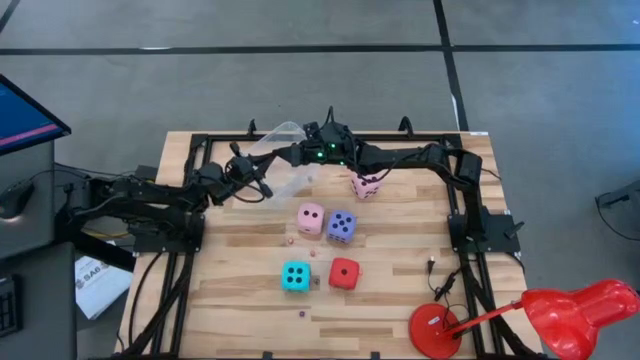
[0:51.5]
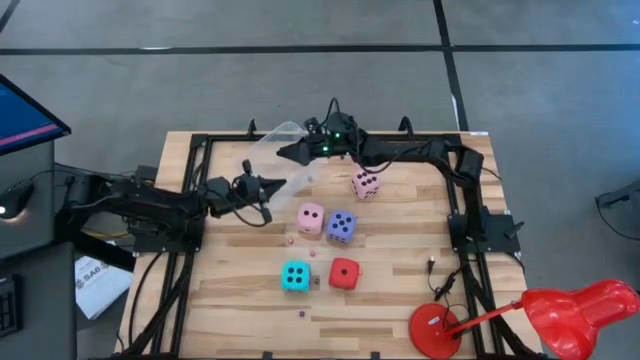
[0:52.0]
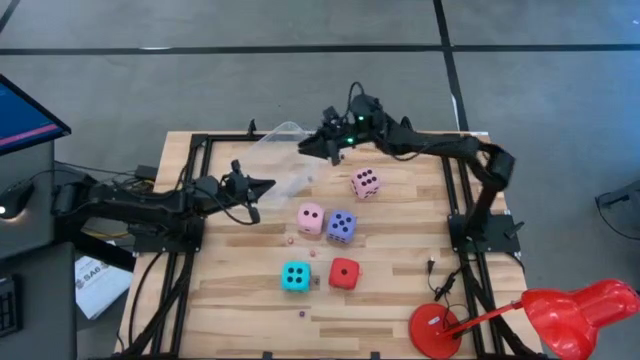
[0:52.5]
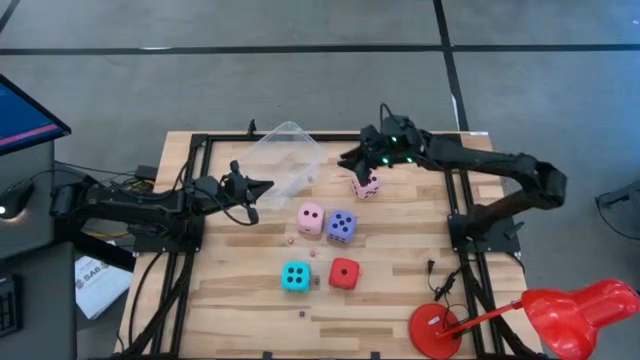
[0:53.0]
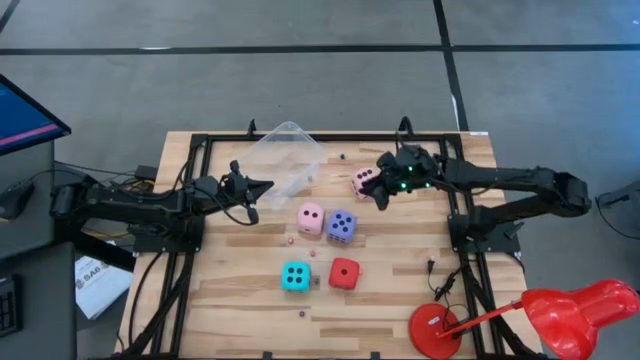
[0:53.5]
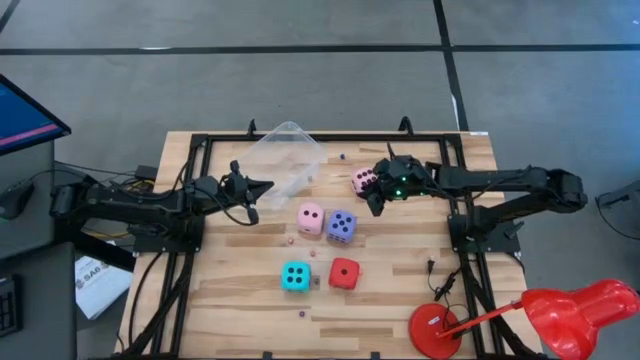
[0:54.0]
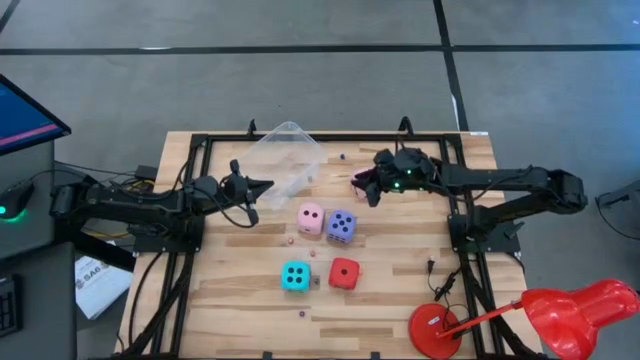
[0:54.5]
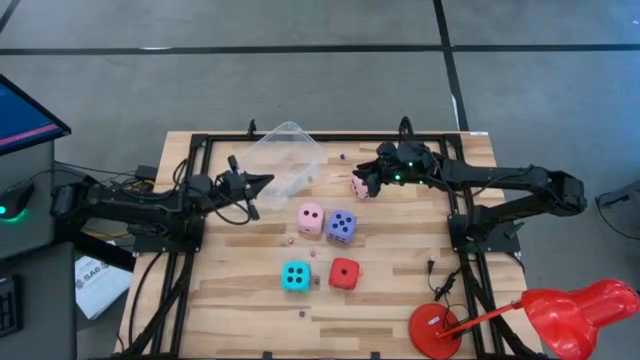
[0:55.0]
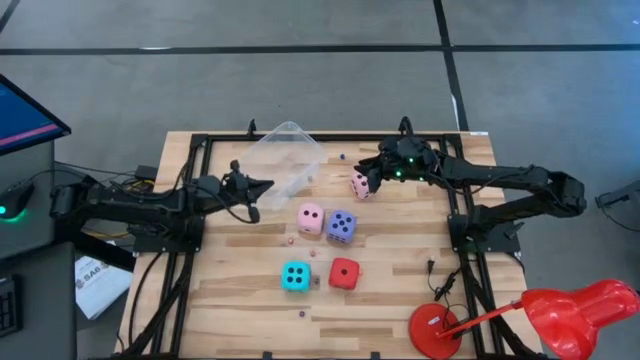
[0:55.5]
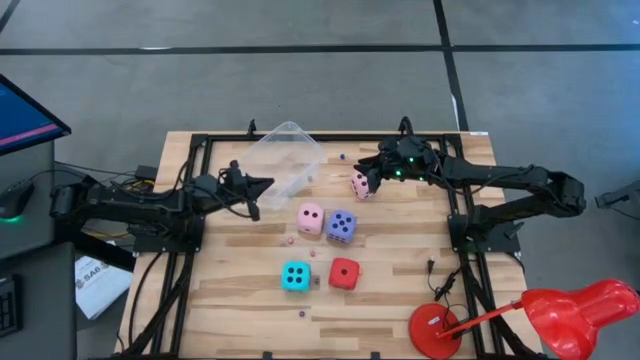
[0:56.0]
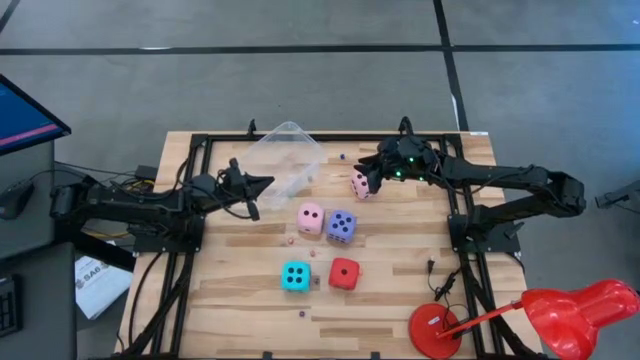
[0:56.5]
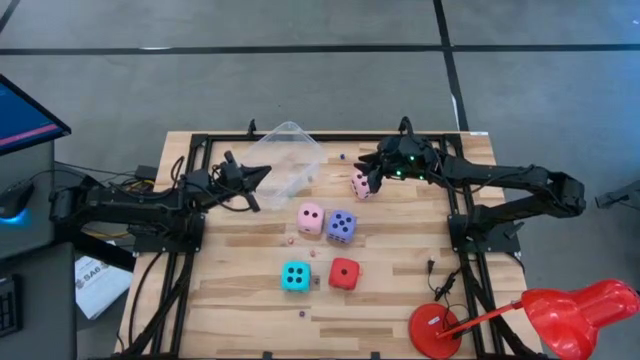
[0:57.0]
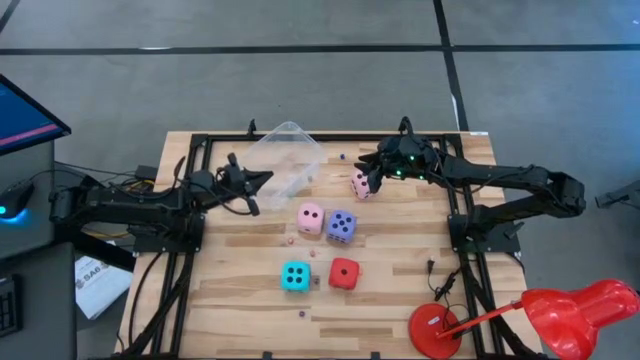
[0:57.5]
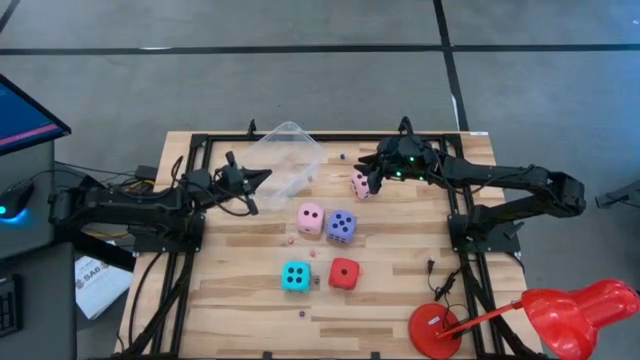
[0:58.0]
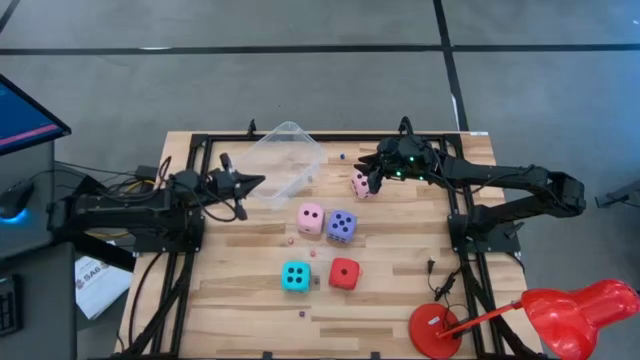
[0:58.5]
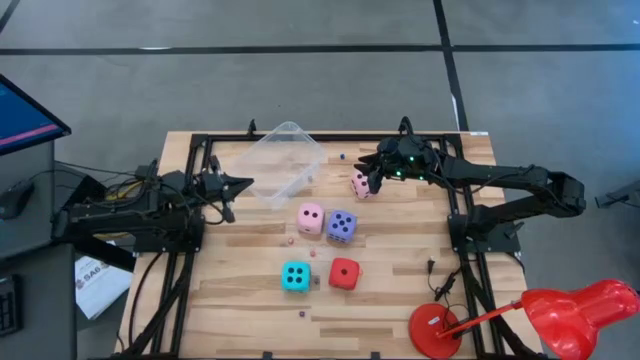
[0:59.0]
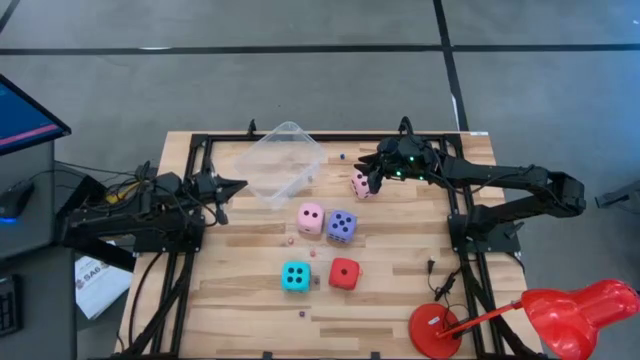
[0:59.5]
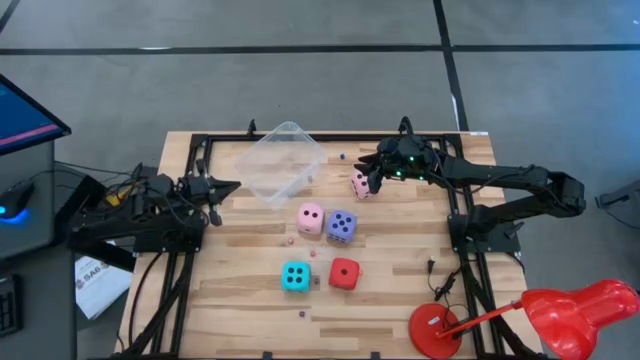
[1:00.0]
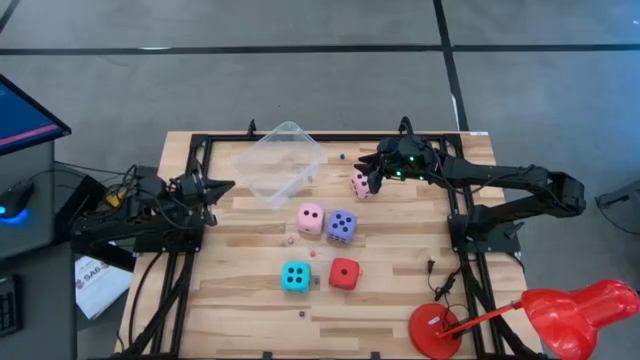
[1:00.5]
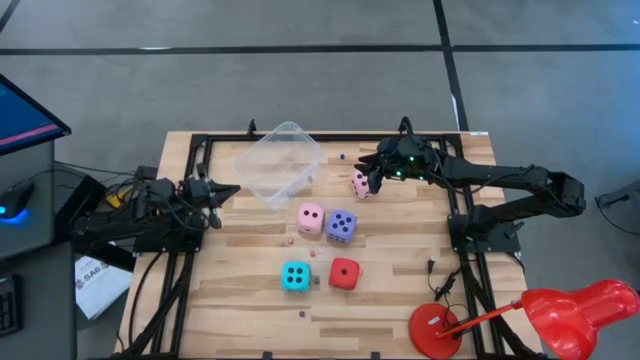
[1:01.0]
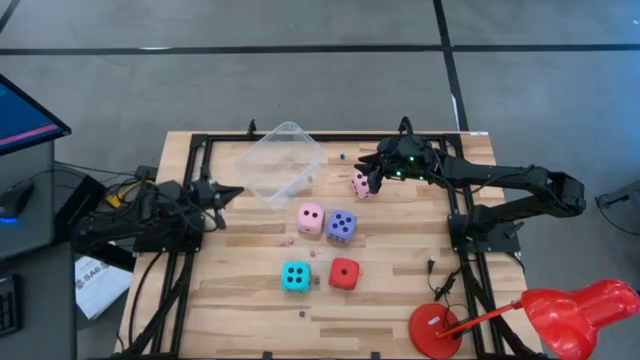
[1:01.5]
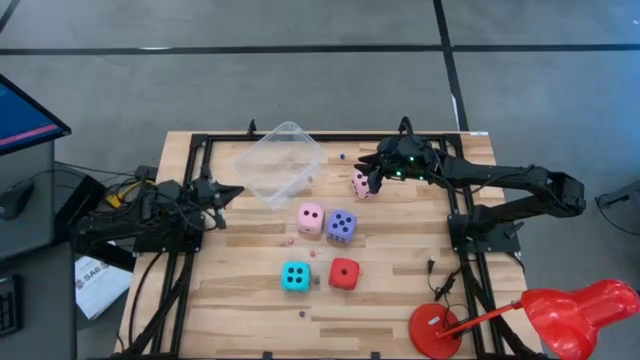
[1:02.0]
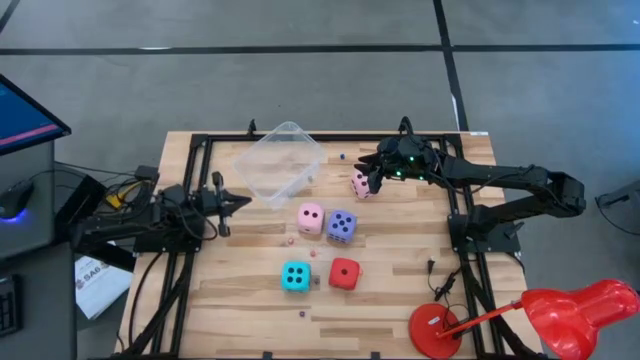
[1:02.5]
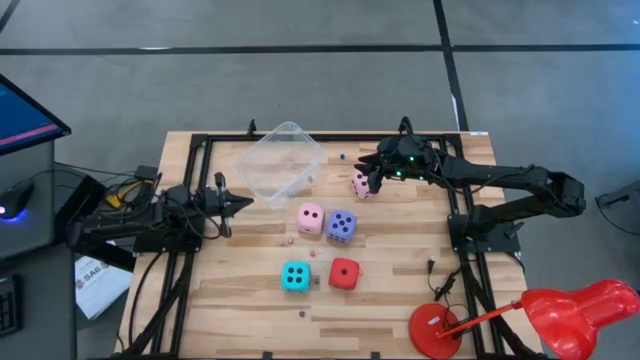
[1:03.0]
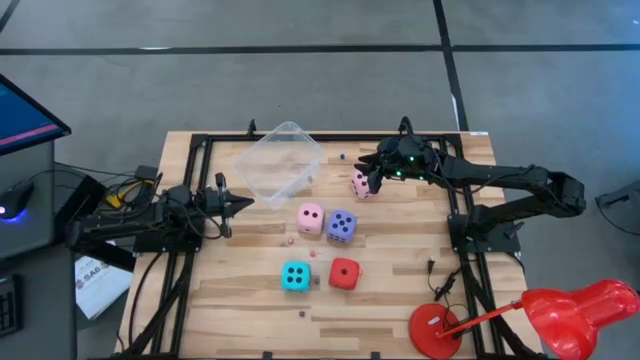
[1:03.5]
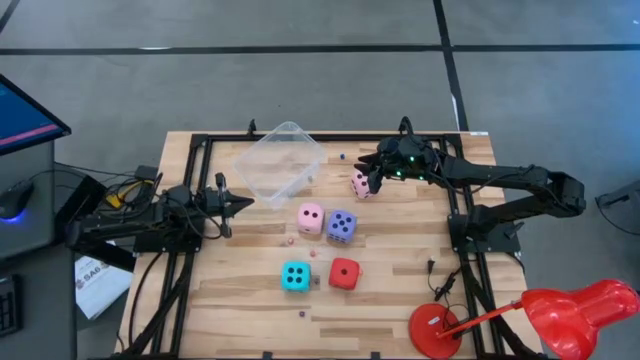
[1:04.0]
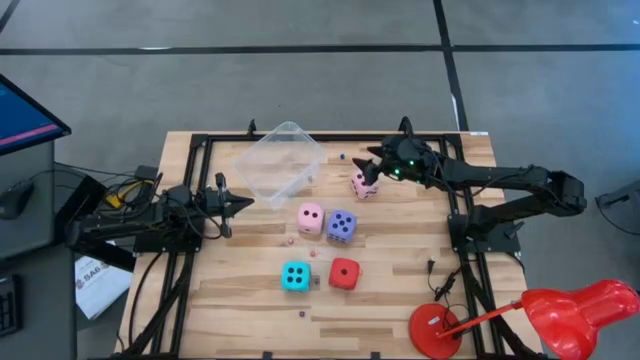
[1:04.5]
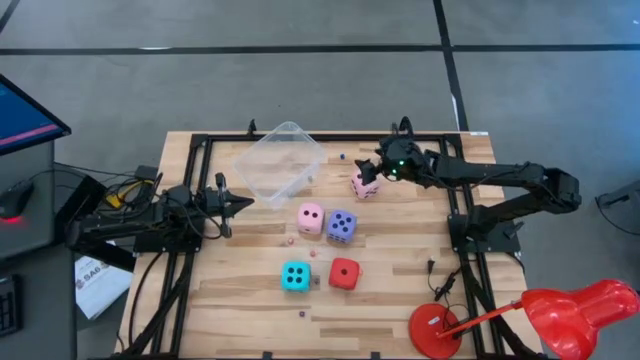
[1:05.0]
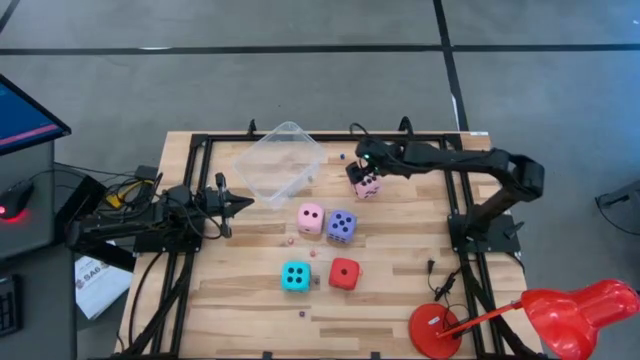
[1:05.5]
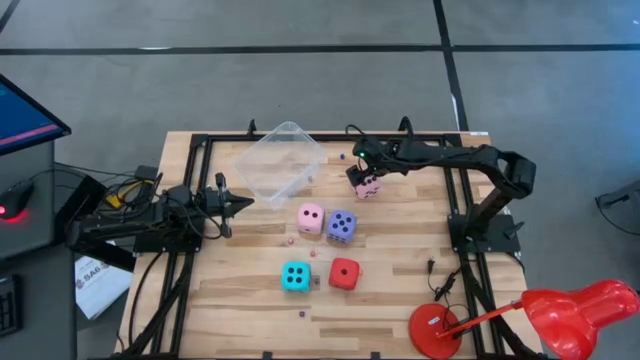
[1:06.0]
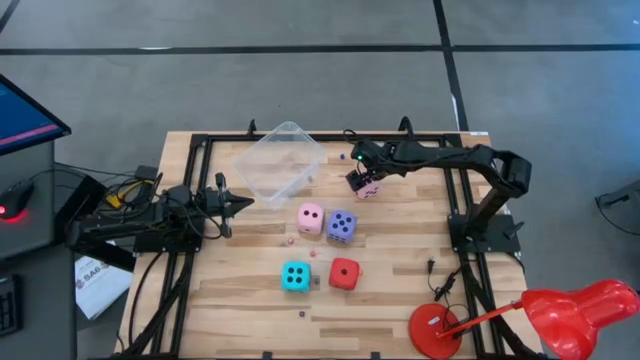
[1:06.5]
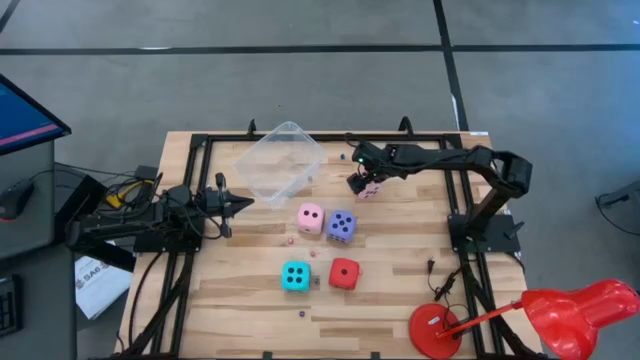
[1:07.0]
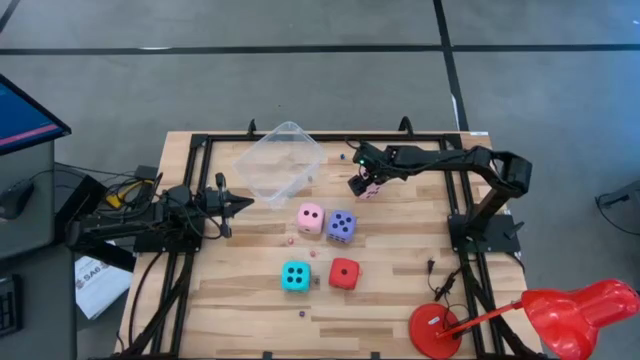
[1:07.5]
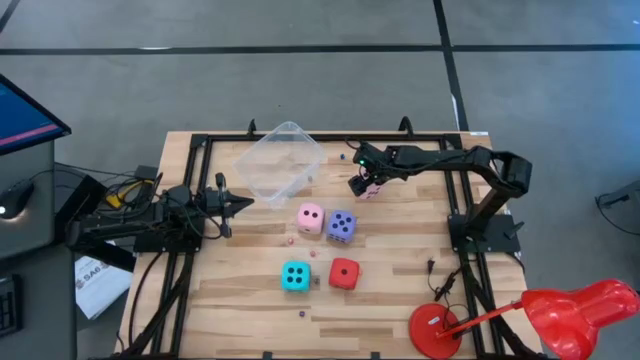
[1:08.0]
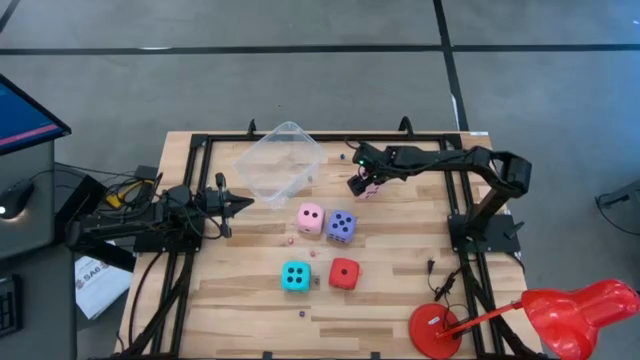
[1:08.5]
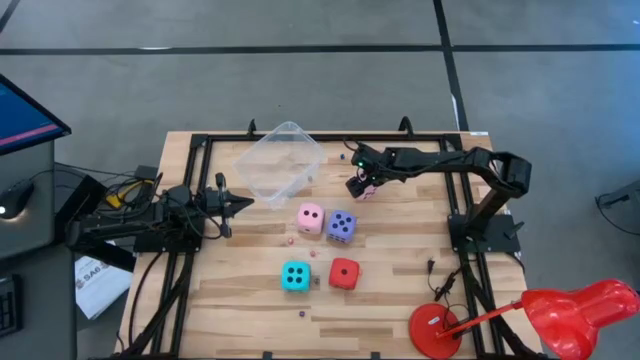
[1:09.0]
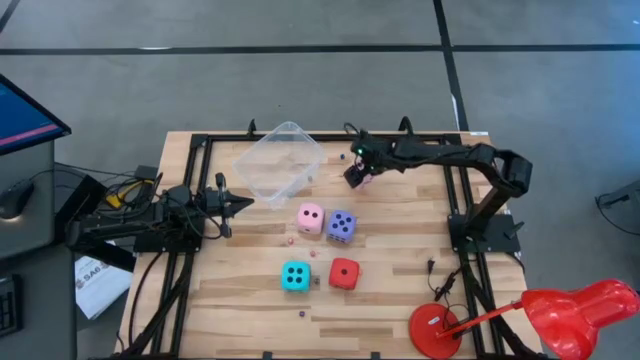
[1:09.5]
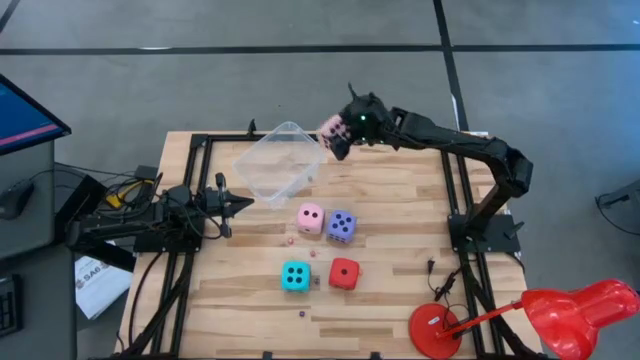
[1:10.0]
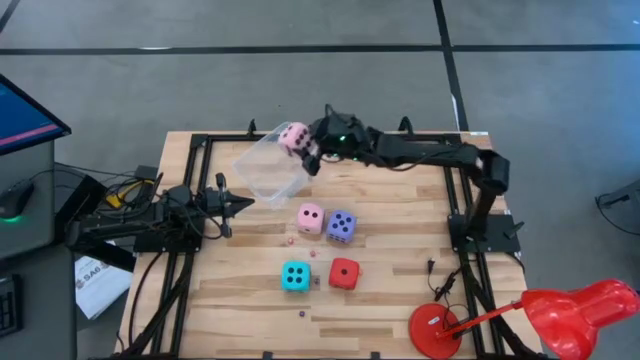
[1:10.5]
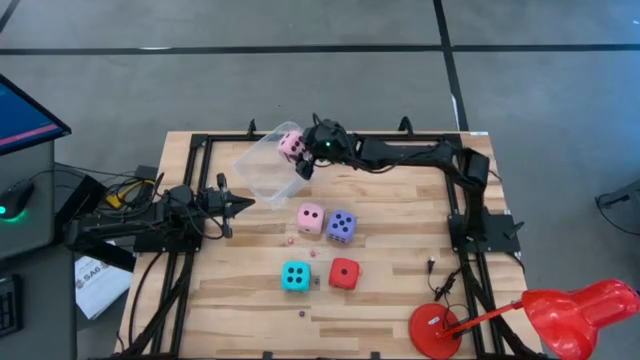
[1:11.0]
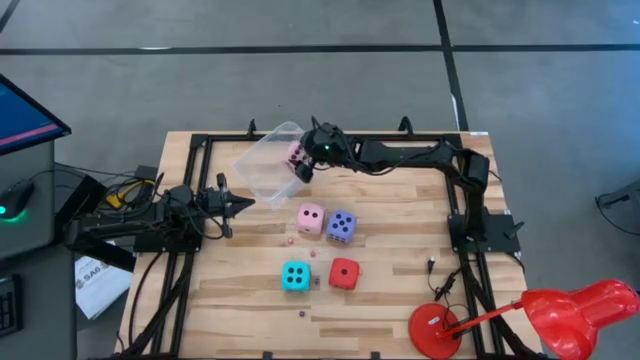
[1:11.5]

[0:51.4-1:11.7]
Task: Pick & Place Dice
Put the top large pink dice into the transparent container

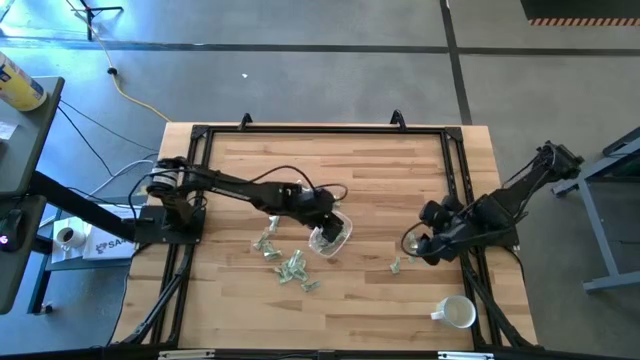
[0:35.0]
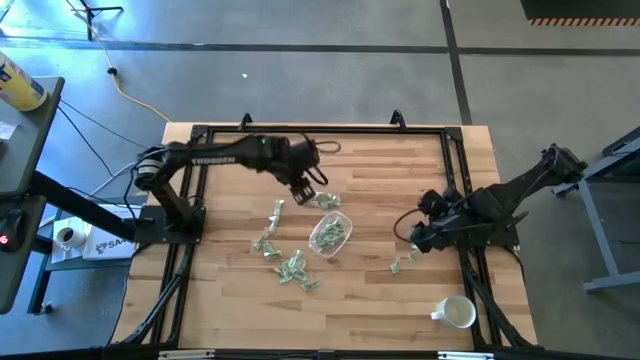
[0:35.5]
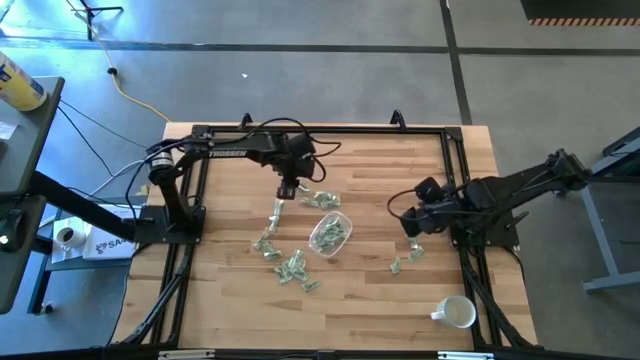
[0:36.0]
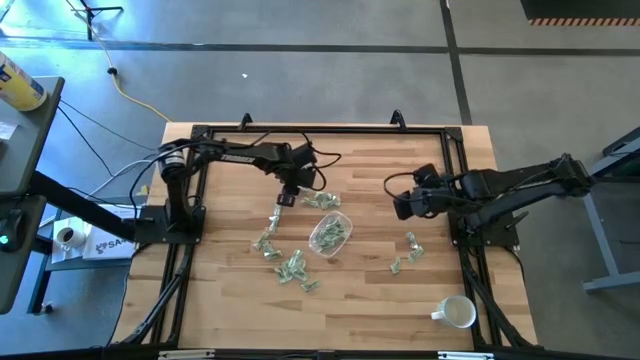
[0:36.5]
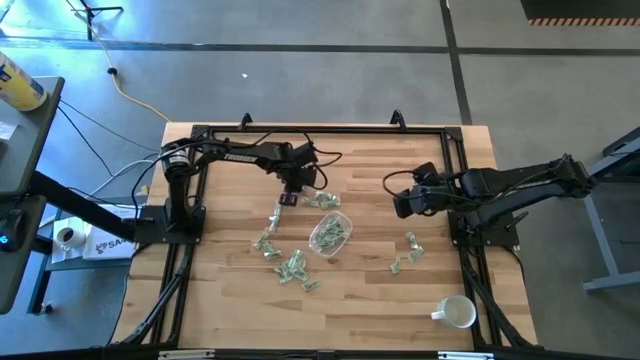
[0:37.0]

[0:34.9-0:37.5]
Task: Pick and place Stevia / Truvia into bins
Put the stevia packet into the transparent bin
